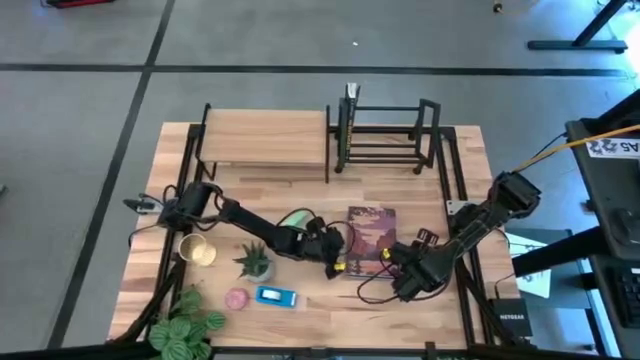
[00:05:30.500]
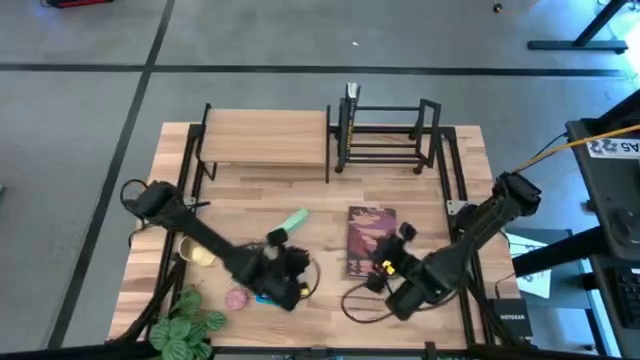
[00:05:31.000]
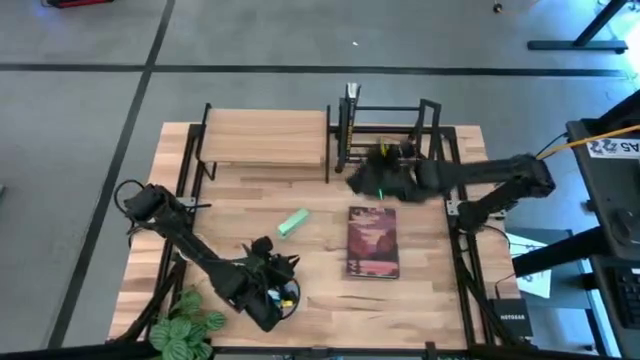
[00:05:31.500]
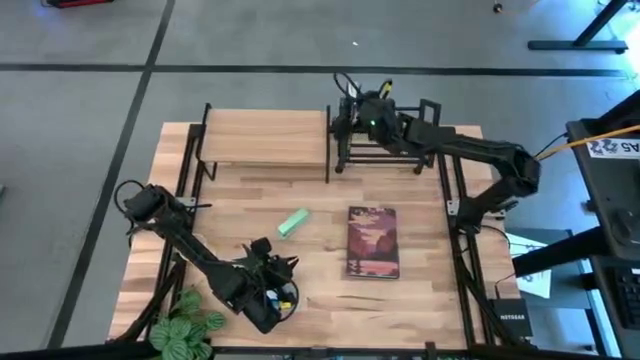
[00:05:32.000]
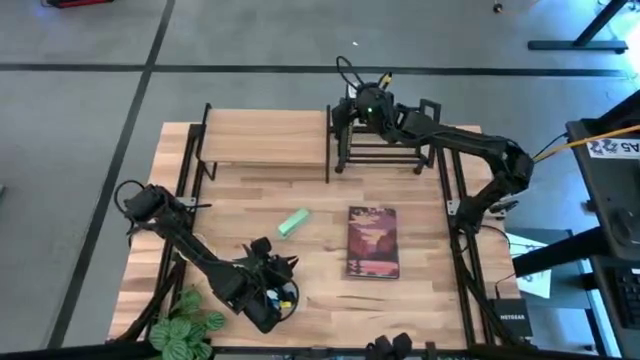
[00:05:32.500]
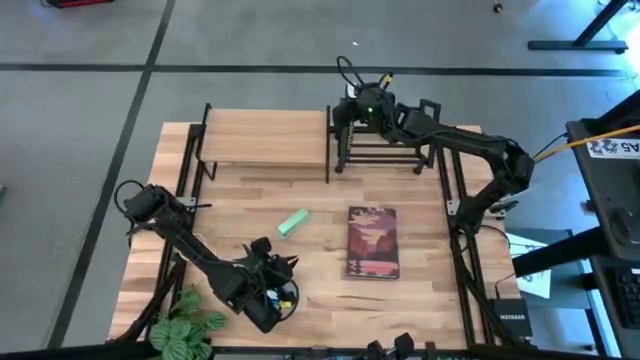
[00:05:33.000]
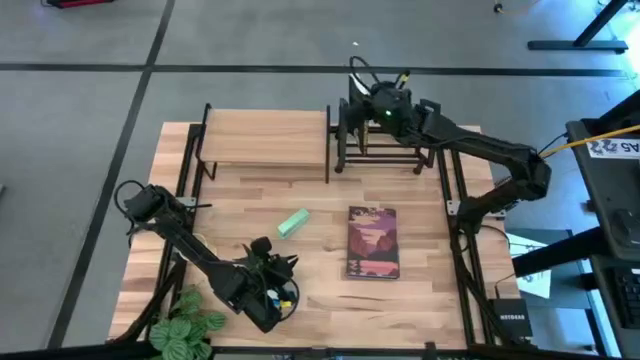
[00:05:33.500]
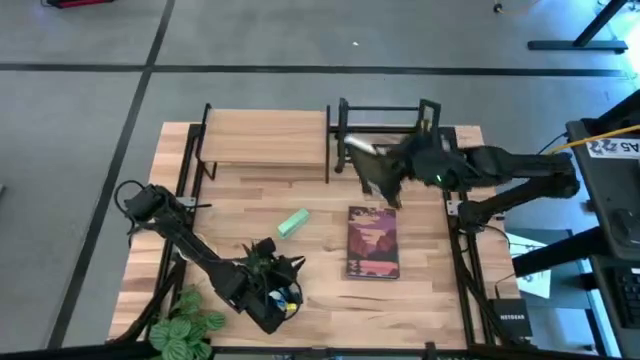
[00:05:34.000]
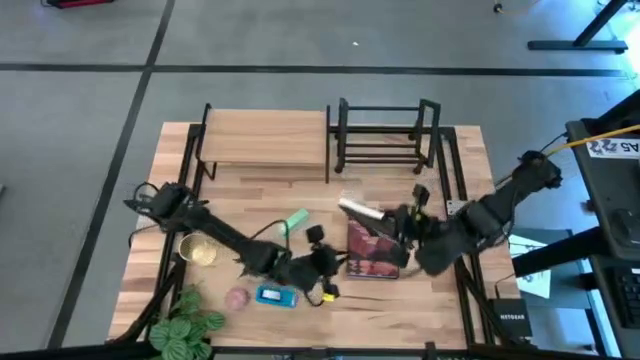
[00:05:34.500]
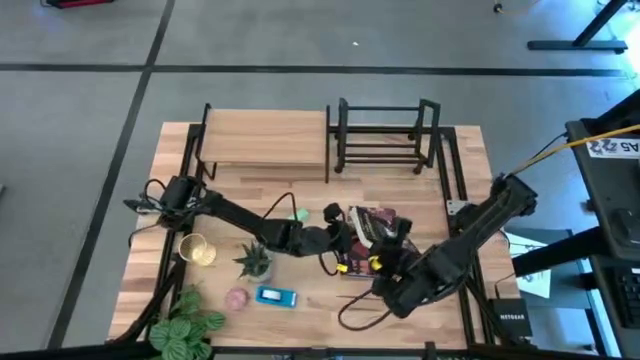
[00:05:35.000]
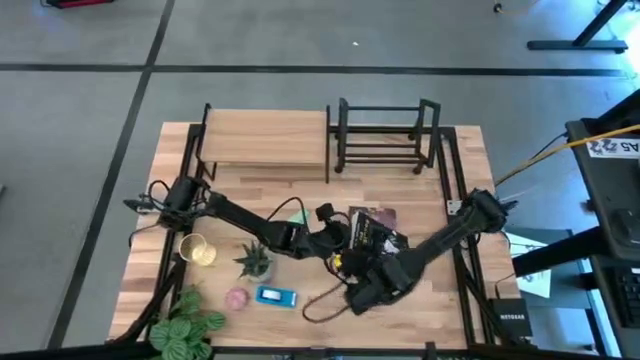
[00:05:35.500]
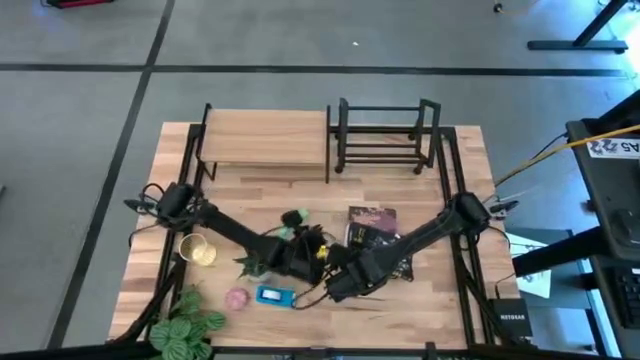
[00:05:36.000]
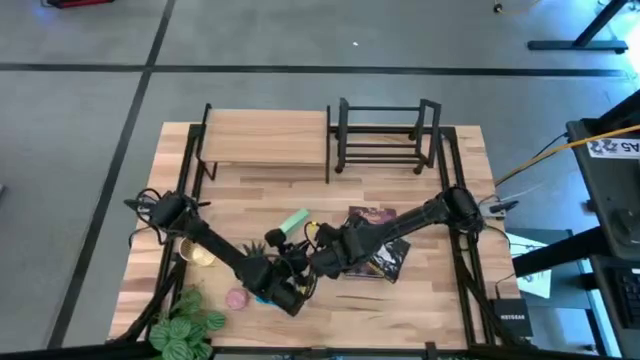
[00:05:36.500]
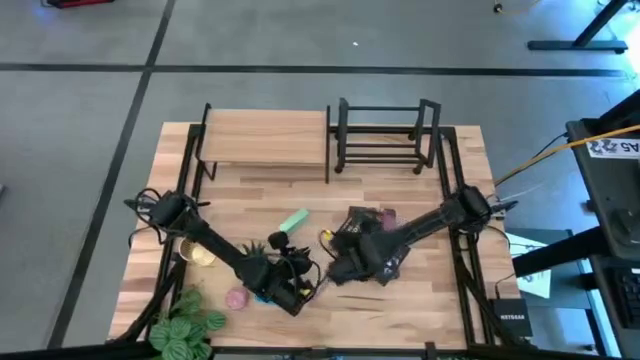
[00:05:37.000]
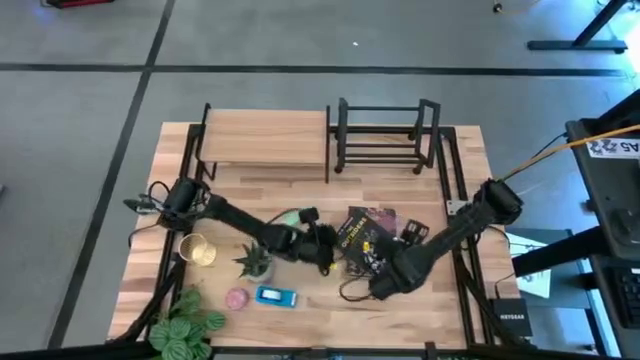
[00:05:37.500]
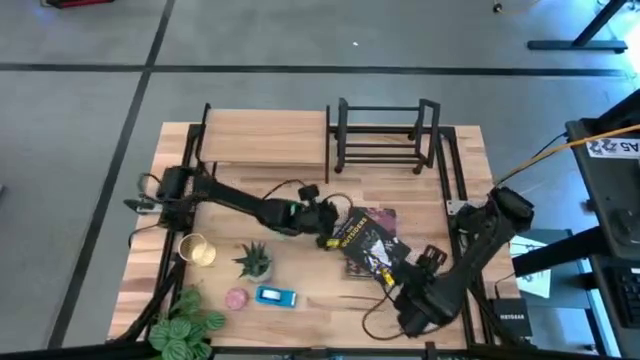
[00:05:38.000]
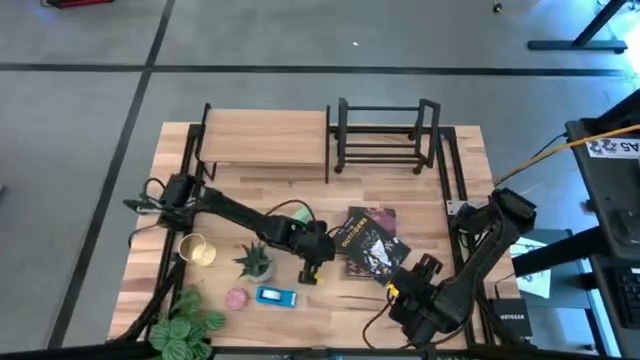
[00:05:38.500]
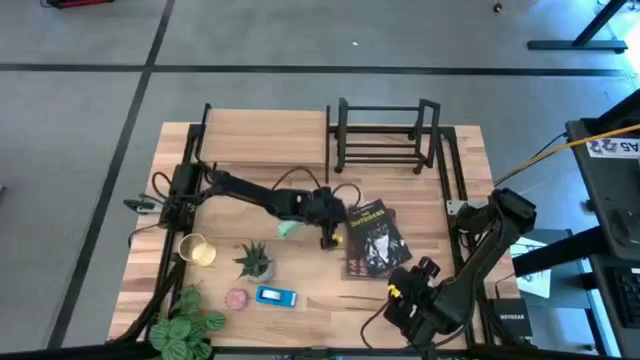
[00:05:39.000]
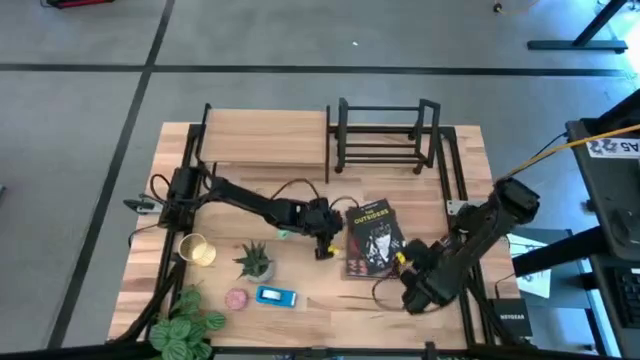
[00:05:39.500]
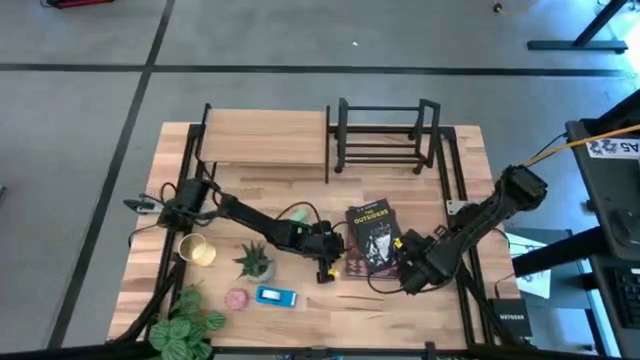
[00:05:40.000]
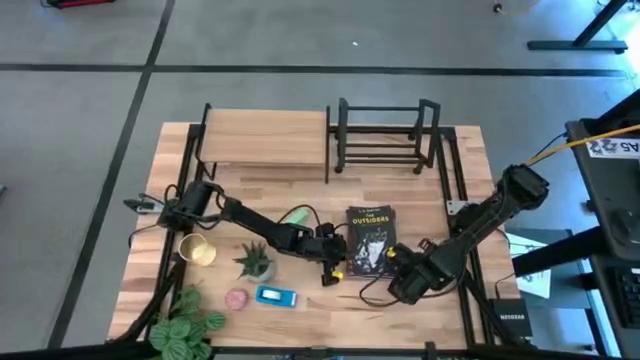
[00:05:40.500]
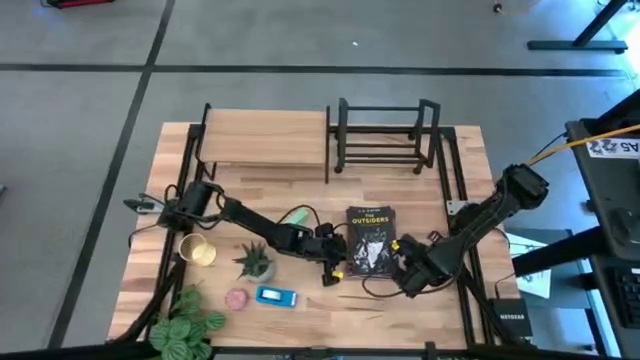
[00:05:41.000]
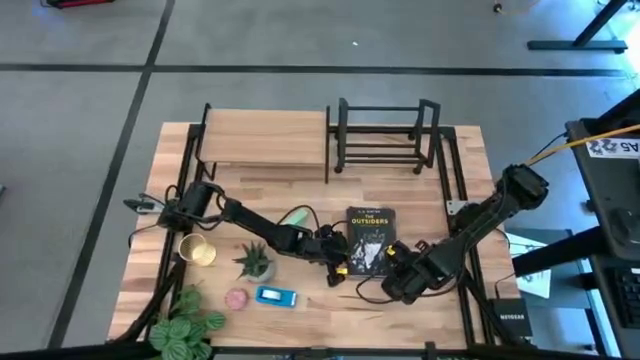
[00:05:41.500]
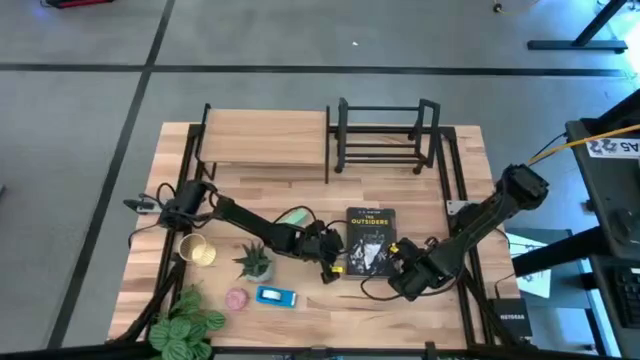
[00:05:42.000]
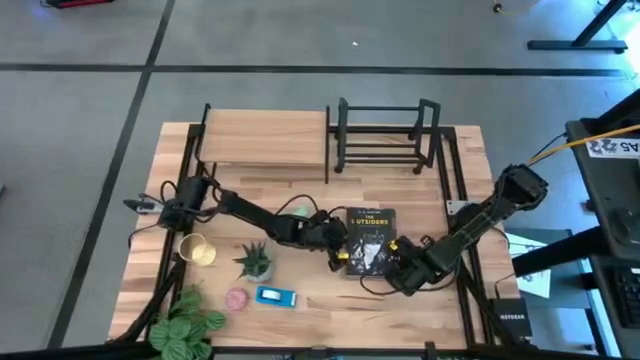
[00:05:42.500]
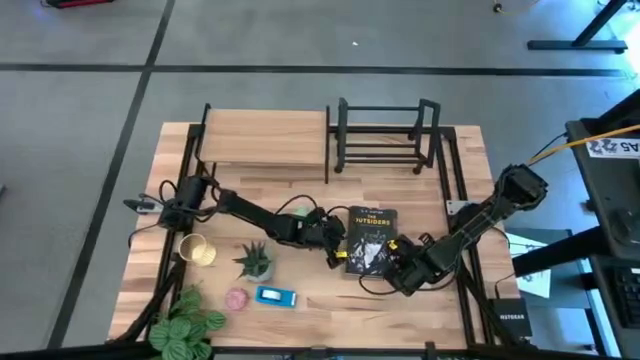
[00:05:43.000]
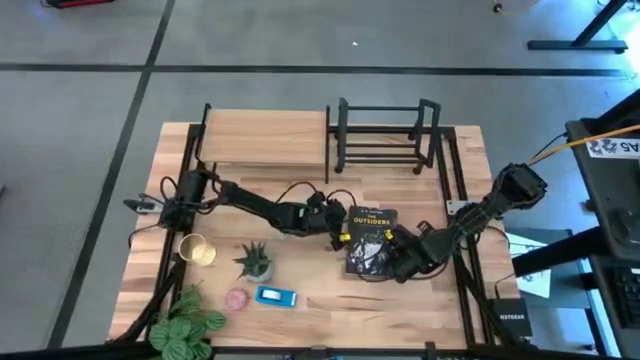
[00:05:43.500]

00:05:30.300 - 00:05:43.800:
Task: Stock shelves
Remove the black book from the bookshelf

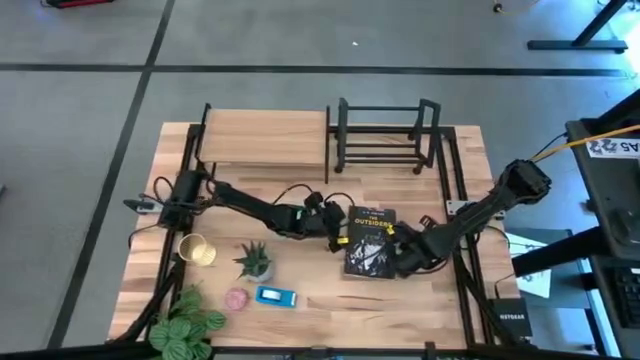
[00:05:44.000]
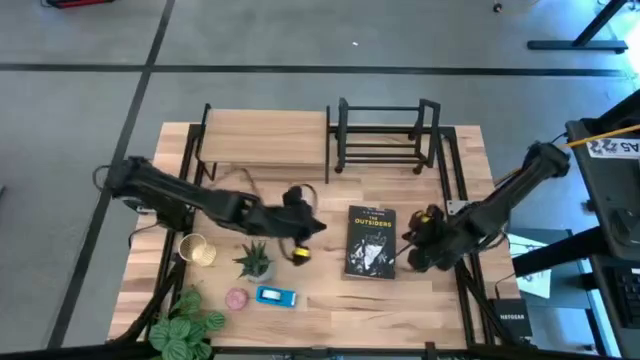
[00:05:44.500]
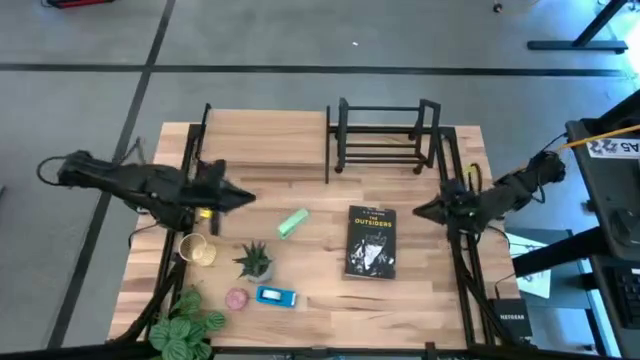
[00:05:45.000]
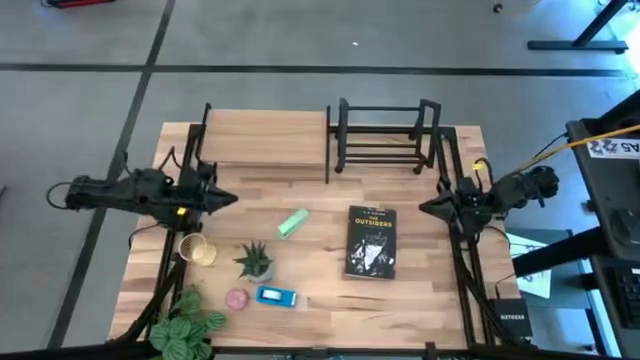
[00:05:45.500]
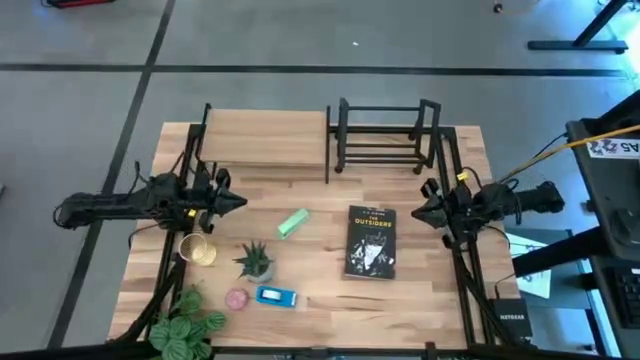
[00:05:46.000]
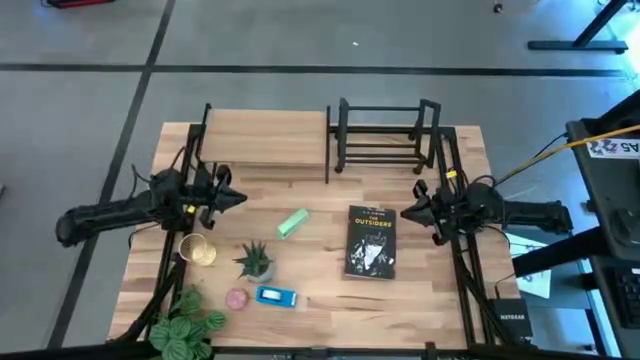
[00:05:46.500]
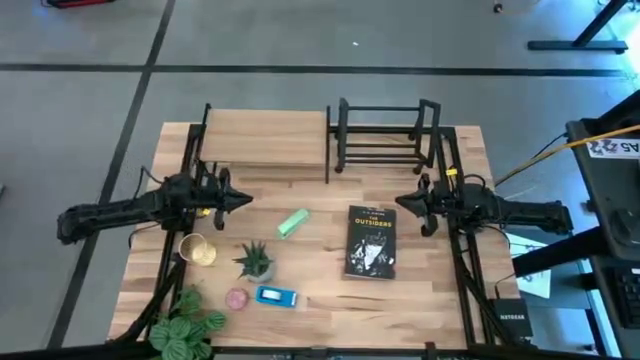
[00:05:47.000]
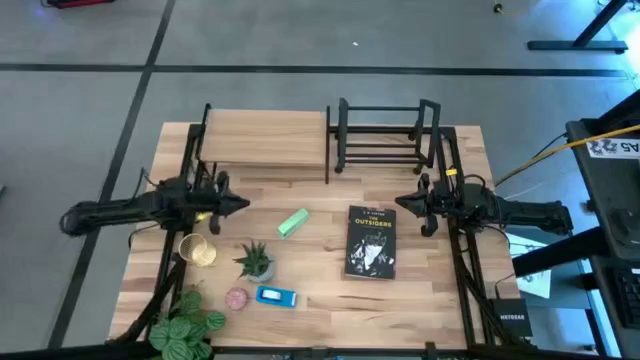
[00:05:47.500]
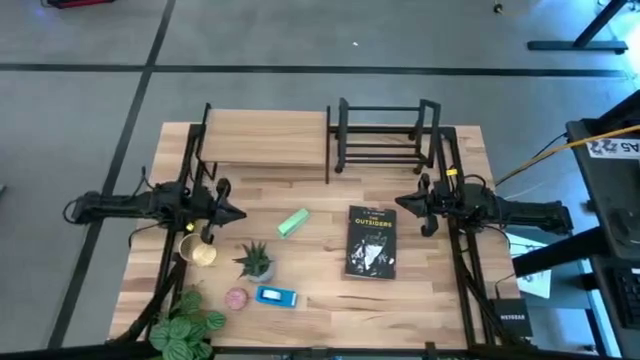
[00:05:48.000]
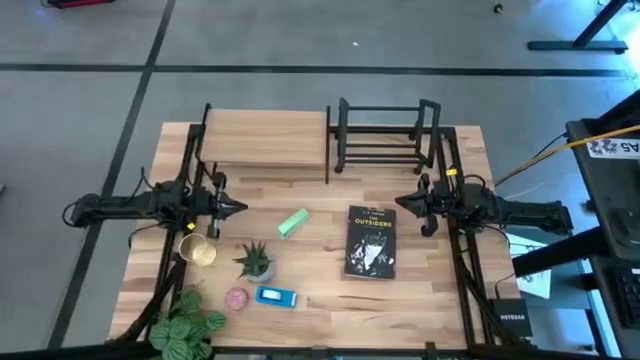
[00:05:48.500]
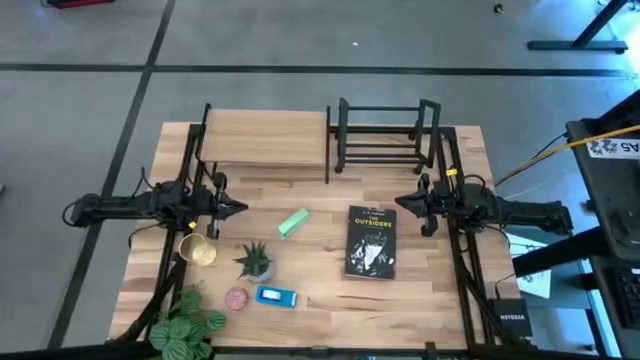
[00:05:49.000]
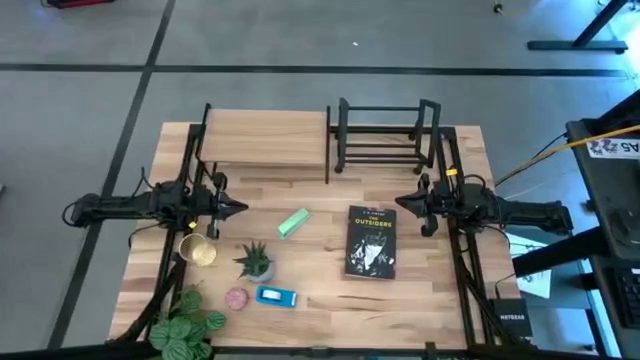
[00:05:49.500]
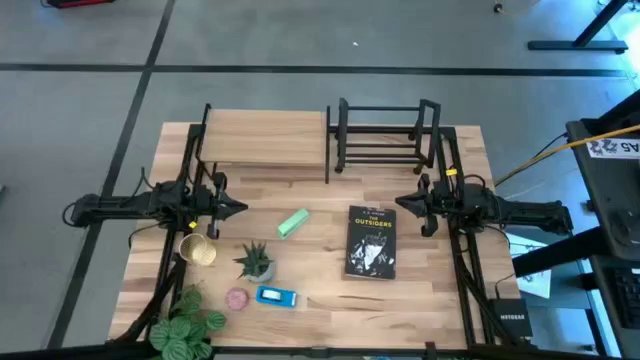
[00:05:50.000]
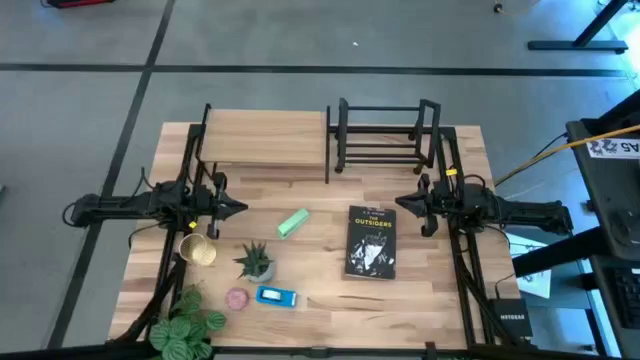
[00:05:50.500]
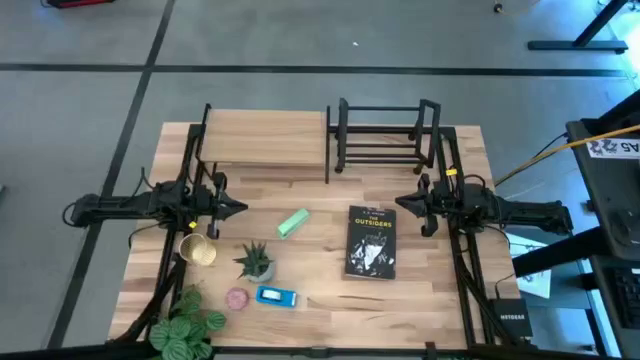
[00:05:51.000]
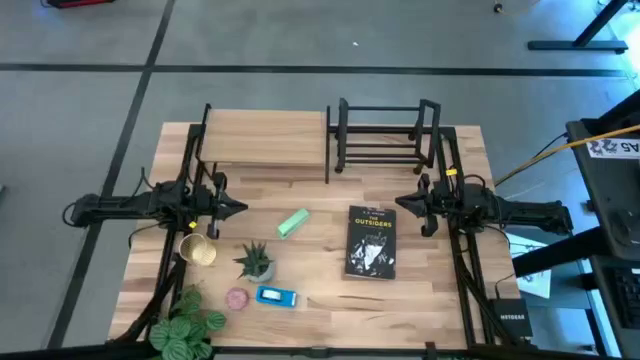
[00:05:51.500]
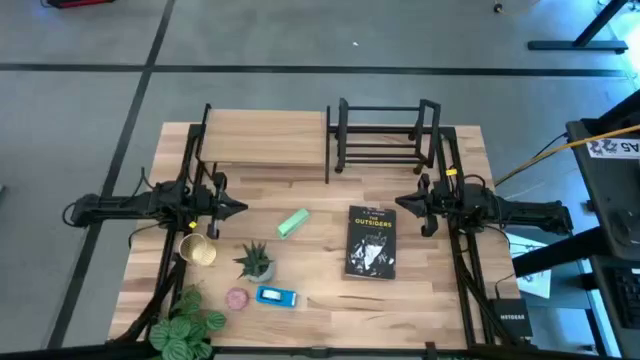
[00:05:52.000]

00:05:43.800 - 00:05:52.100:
Return to home position
